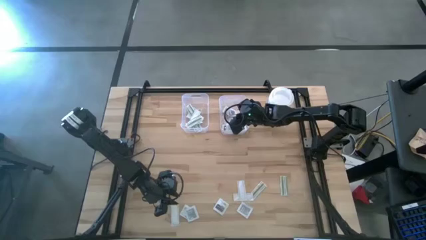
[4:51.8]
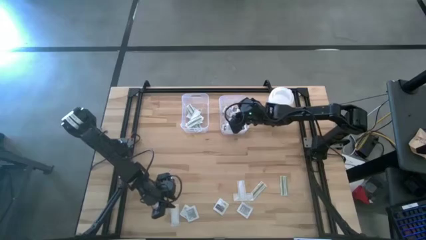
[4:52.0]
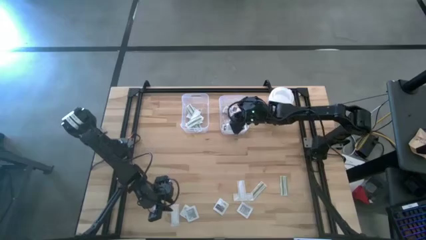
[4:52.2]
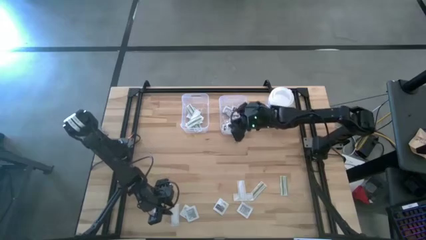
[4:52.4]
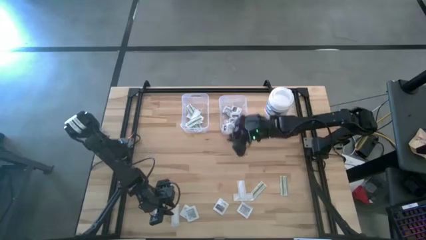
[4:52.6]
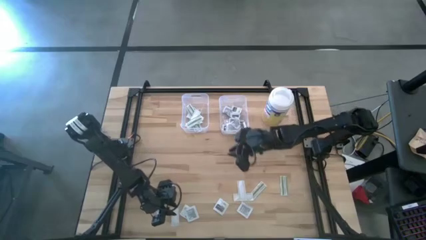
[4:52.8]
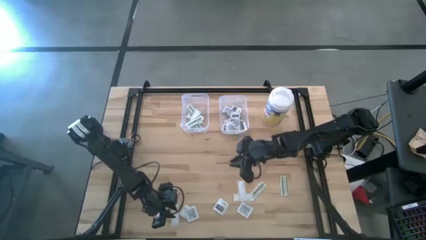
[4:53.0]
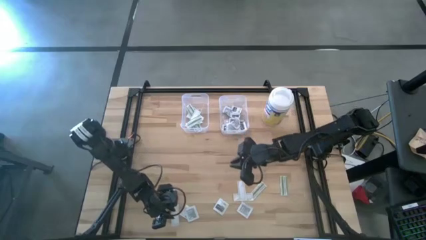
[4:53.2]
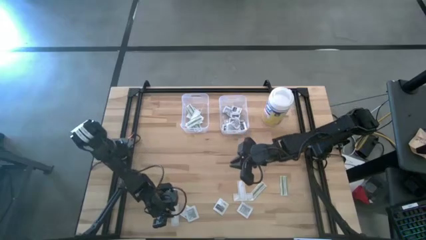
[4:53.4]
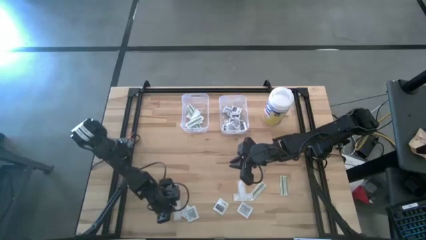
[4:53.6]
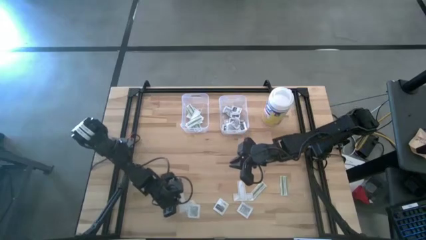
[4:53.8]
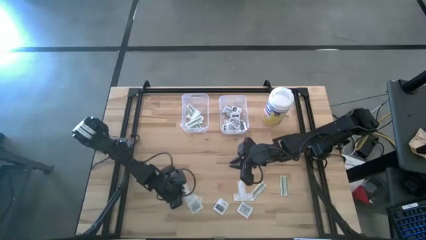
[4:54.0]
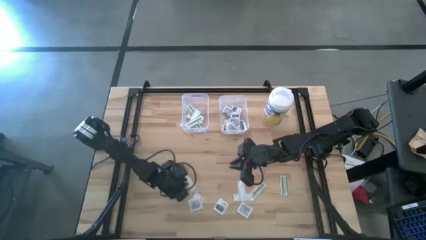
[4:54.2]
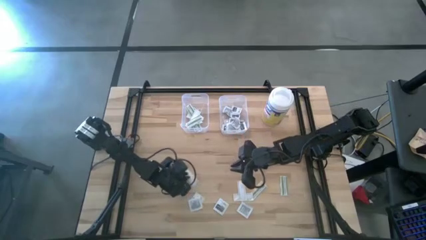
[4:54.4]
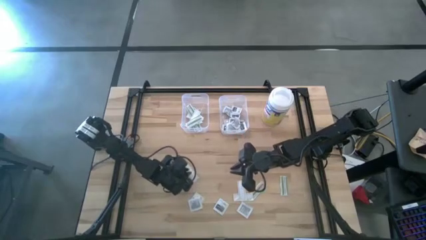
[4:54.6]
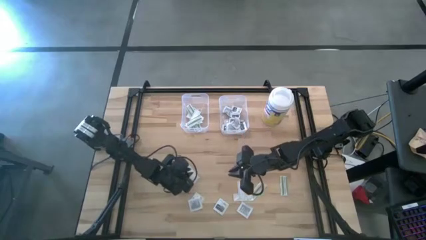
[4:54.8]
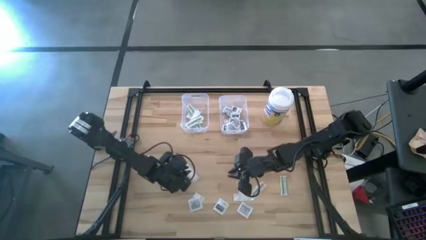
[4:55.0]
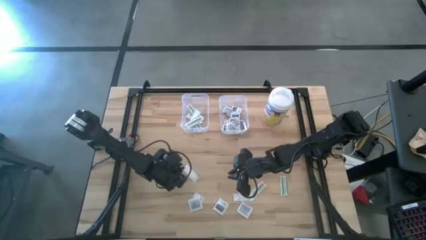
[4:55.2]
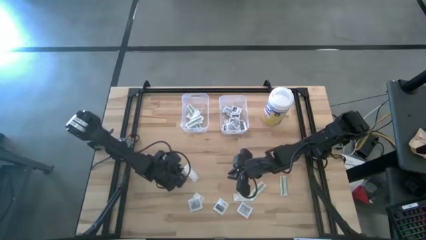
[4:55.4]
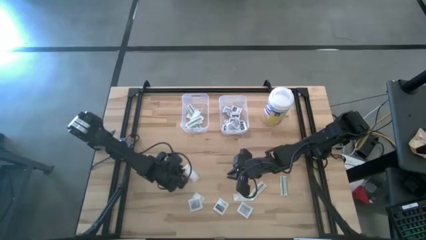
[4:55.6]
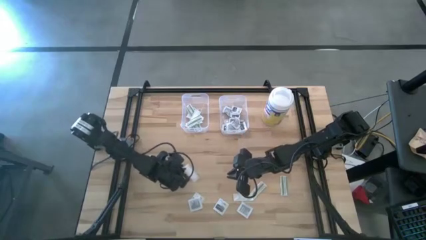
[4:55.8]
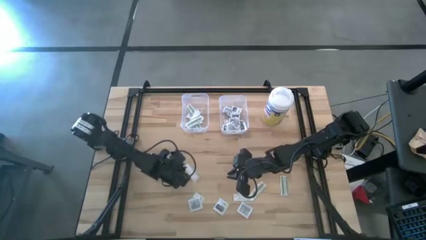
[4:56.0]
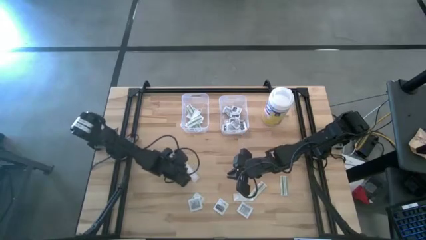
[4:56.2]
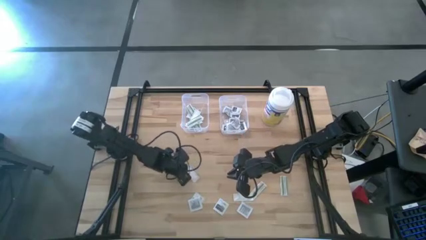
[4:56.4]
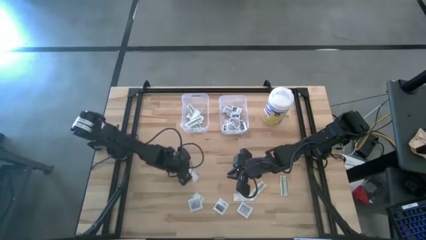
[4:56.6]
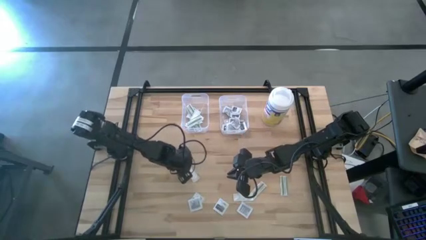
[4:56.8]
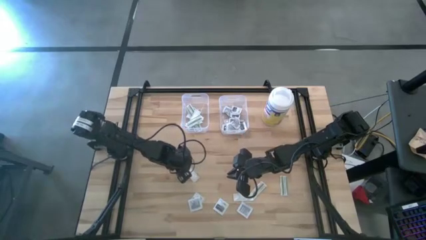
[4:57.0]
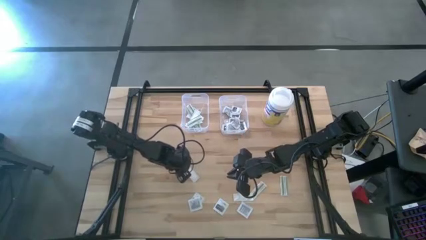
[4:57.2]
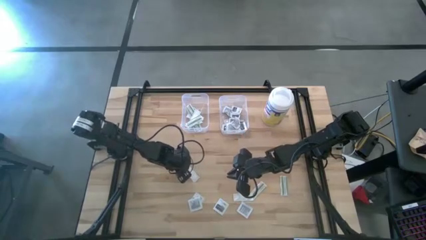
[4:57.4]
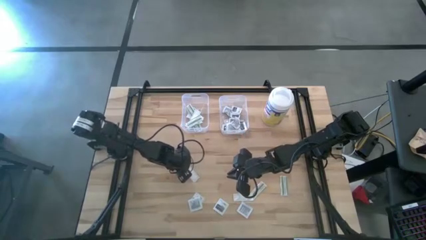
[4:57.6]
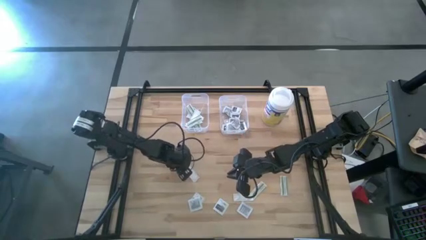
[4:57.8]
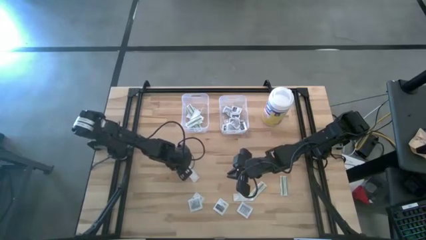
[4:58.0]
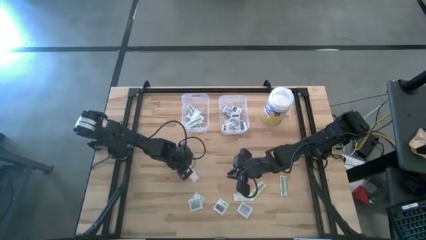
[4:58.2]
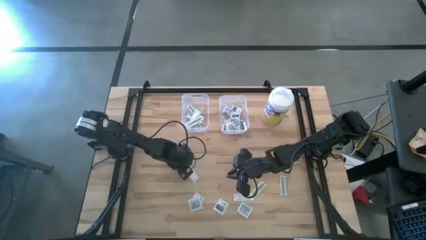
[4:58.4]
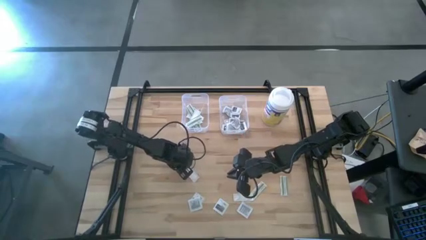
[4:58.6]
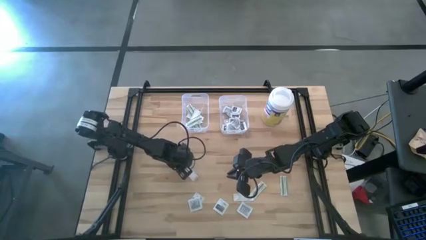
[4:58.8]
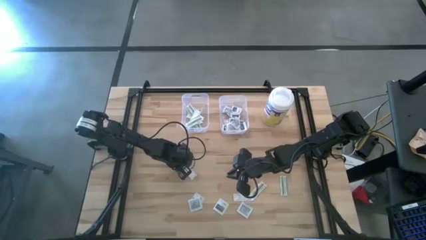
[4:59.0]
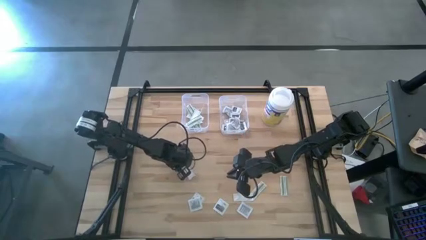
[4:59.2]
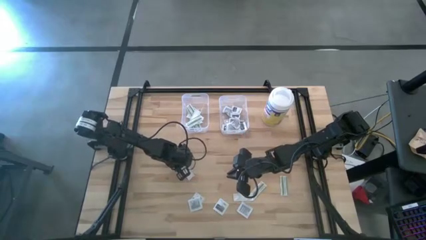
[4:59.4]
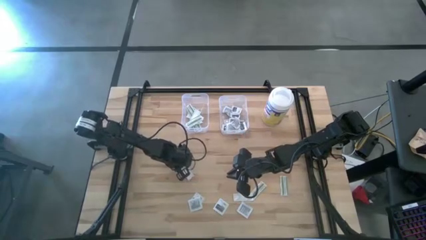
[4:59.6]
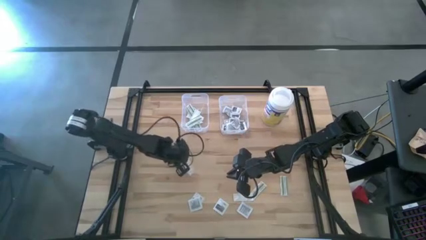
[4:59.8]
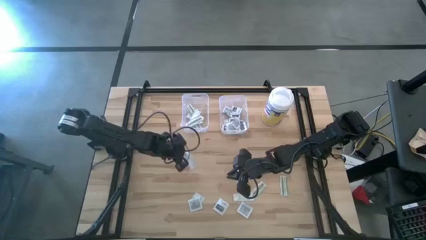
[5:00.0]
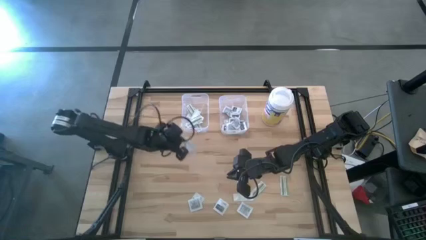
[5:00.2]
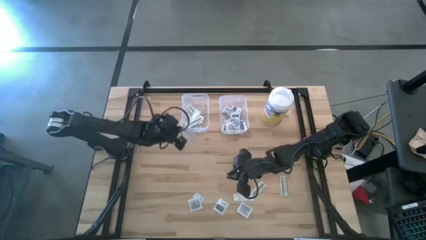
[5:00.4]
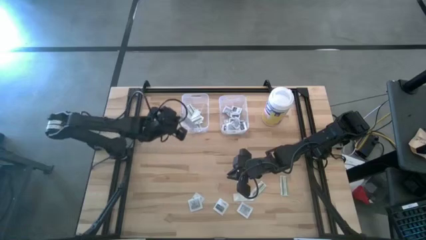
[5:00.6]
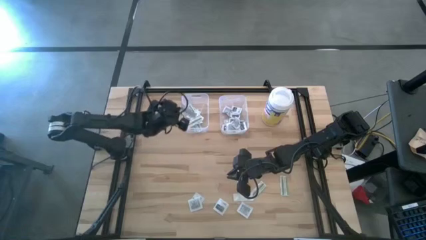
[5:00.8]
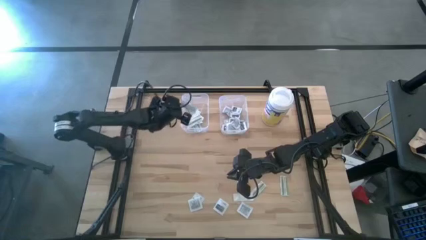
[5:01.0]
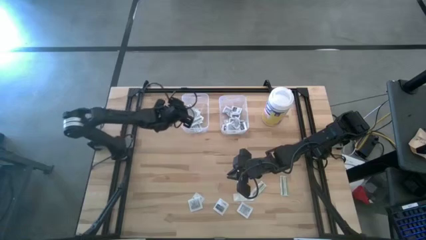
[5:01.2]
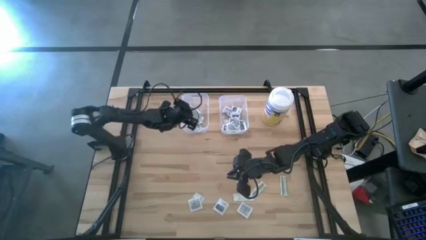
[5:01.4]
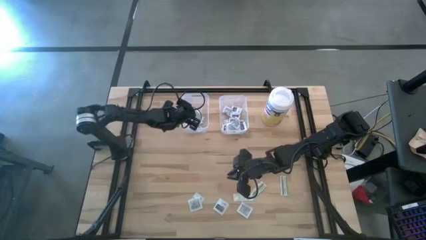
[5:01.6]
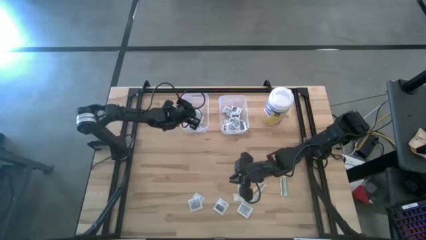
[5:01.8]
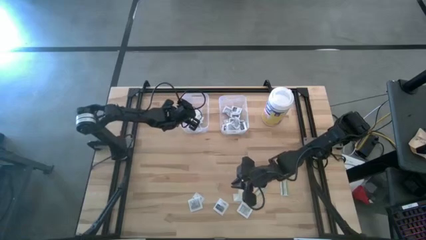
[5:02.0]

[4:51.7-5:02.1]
Task: Pick & Place First Aid Supplies
Put the green bandage pack into the left transparent bin

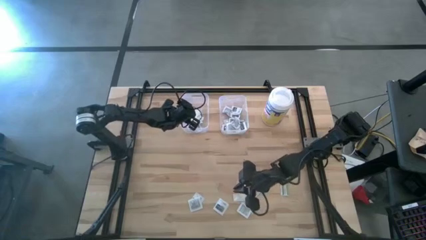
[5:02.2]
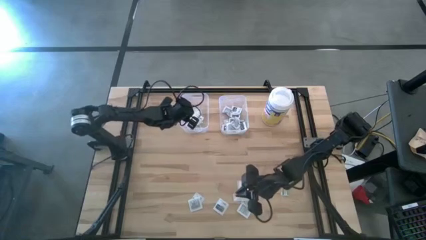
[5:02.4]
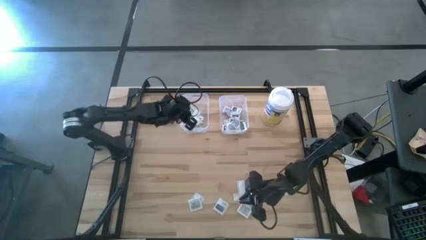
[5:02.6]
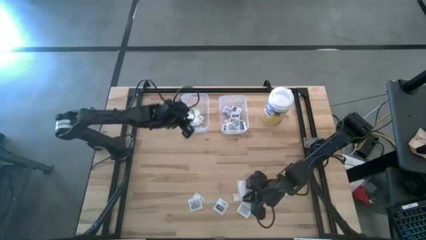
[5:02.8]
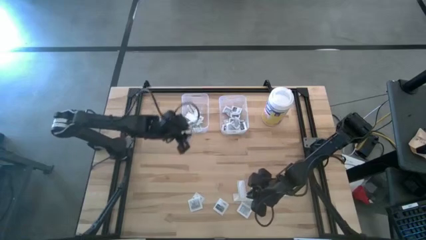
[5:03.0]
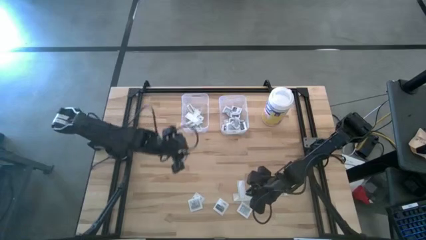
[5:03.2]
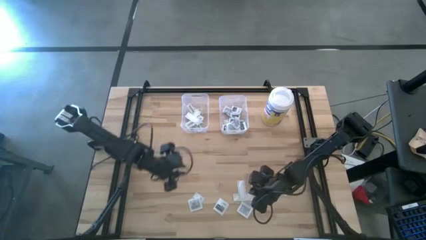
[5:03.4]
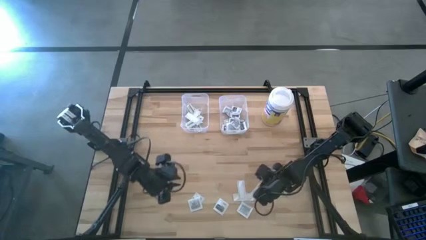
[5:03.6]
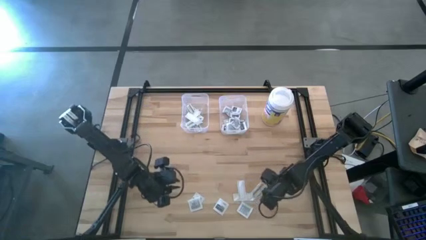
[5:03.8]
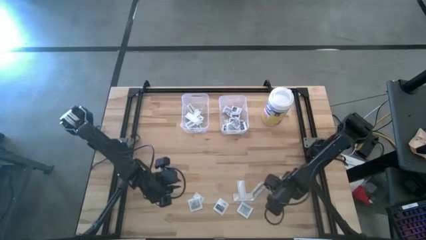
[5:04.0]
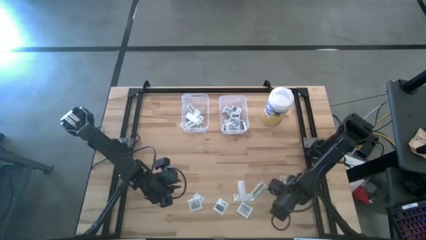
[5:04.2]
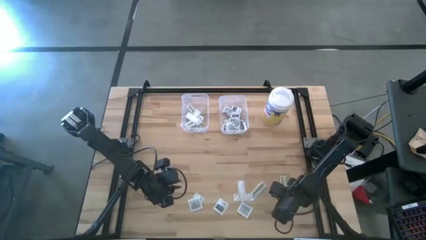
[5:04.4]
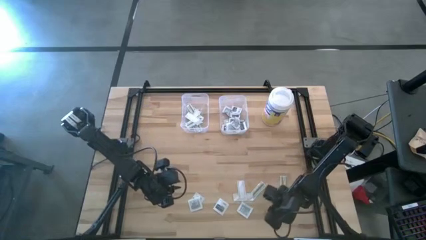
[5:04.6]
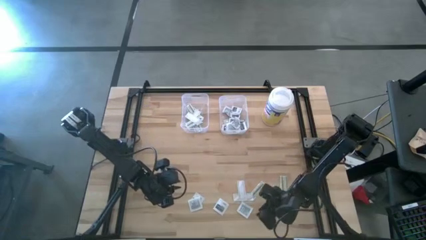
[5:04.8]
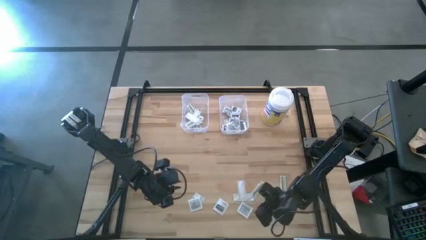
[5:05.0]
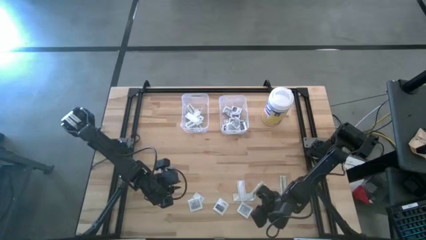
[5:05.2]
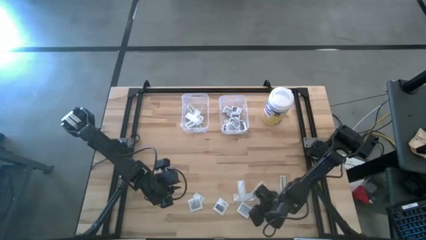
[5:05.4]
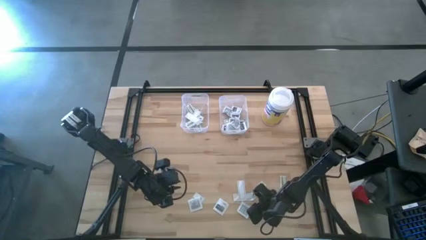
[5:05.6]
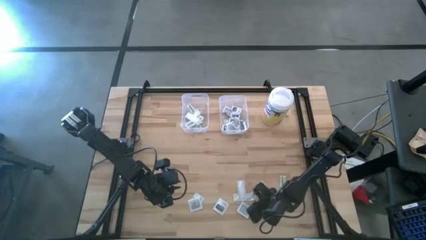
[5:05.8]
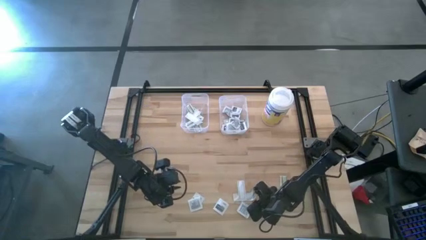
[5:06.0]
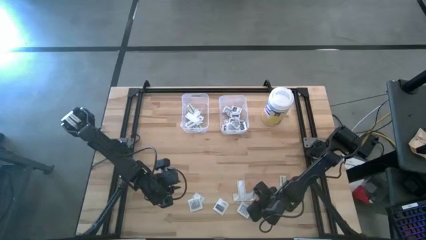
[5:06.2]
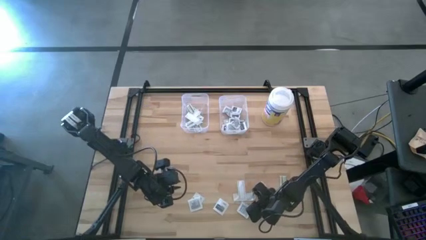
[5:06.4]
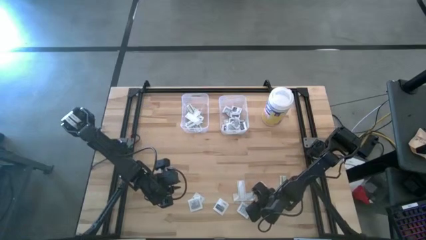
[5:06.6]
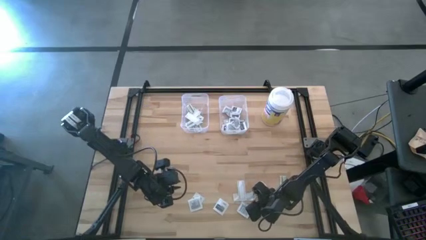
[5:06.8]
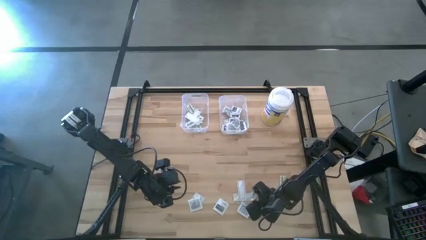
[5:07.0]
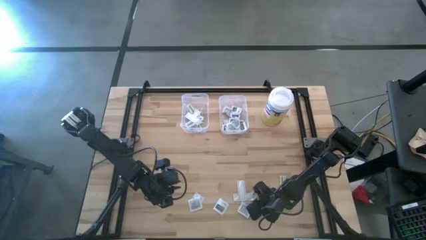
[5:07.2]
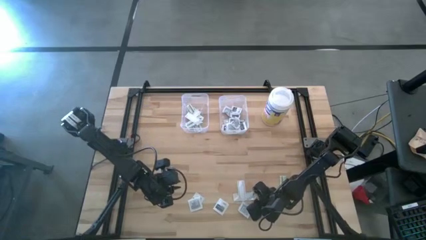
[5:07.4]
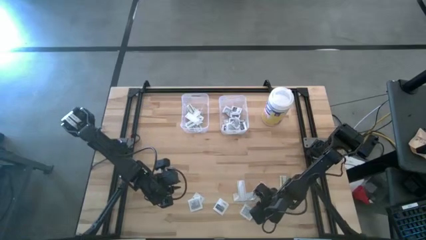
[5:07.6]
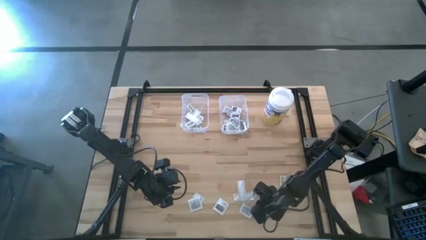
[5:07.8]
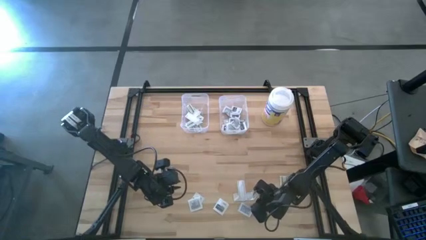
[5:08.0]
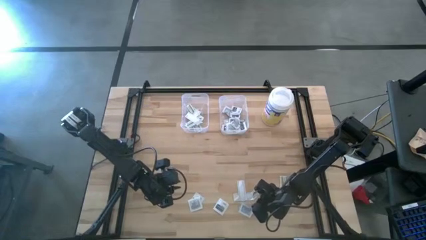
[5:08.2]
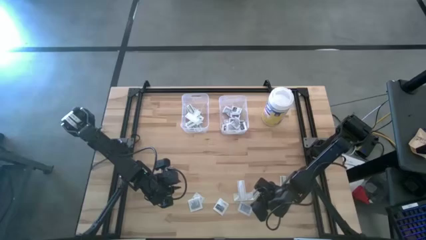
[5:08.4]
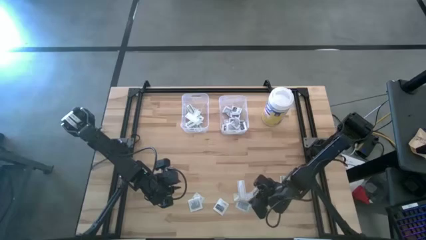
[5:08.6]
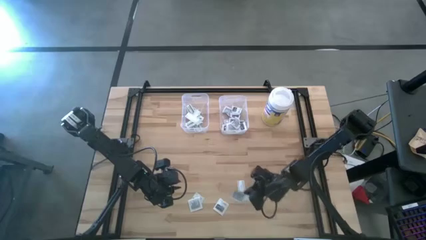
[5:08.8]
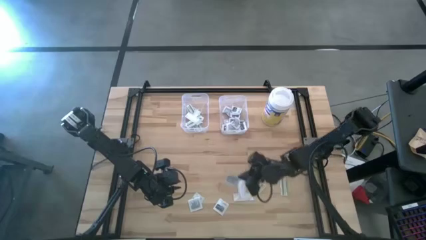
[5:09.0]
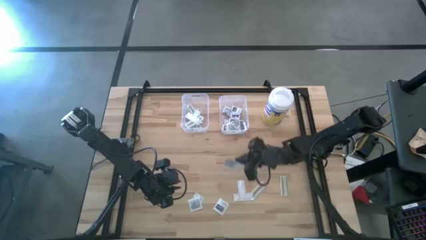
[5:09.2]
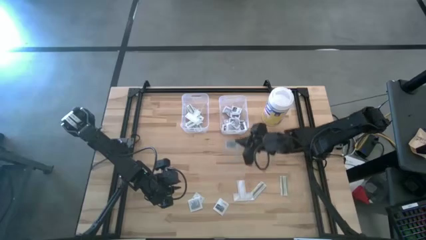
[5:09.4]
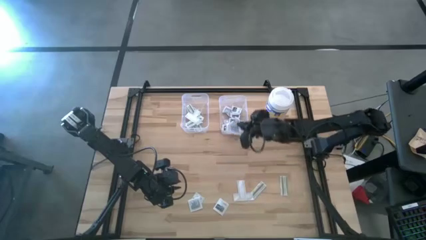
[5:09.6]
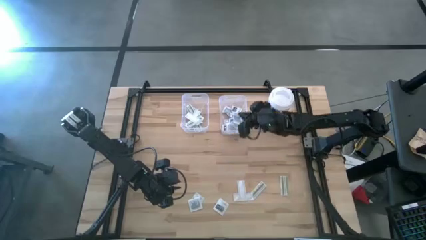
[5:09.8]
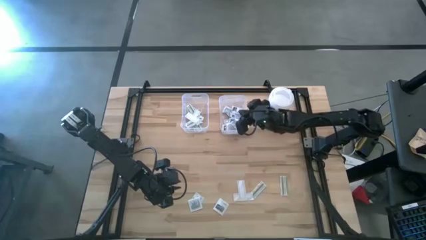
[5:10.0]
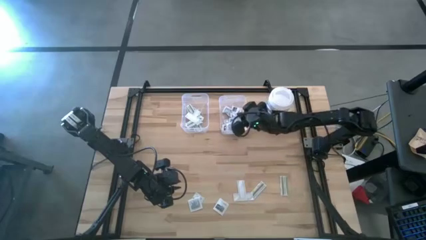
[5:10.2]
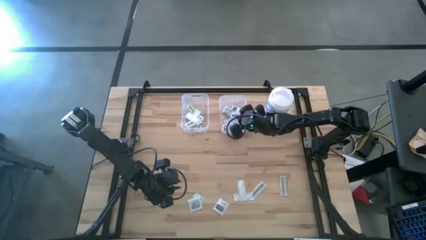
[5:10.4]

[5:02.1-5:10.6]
Put the gray towelette pack into the right transparent bin
